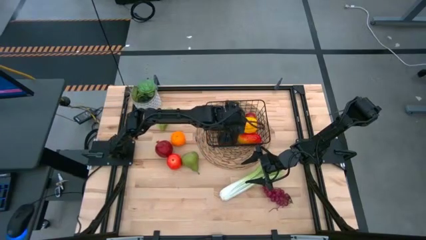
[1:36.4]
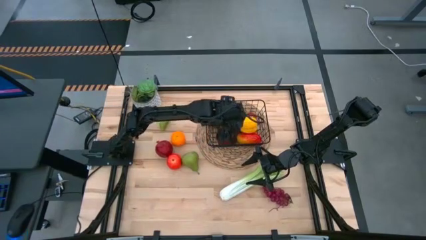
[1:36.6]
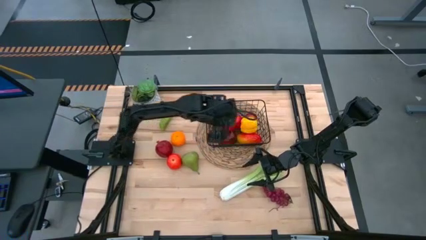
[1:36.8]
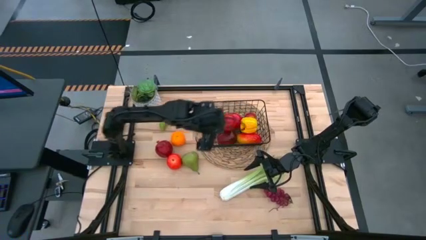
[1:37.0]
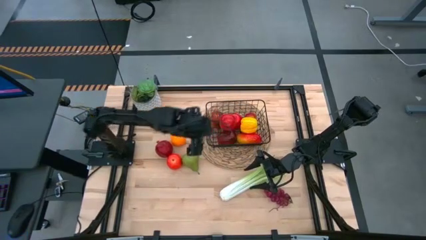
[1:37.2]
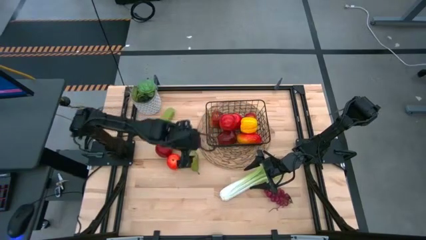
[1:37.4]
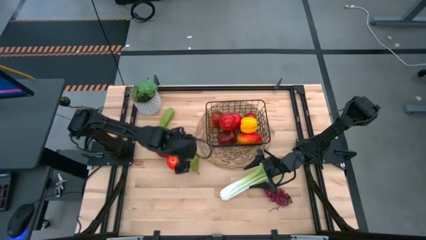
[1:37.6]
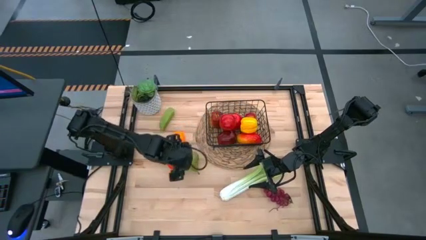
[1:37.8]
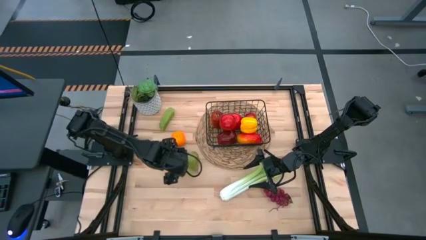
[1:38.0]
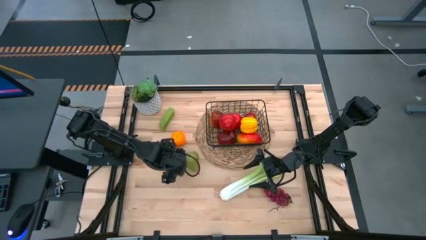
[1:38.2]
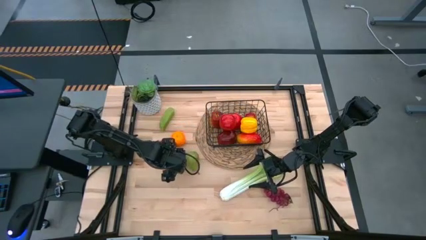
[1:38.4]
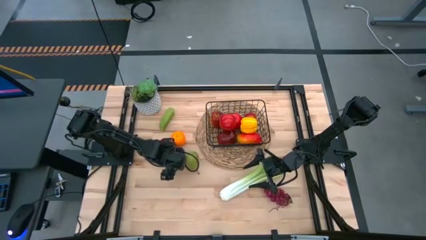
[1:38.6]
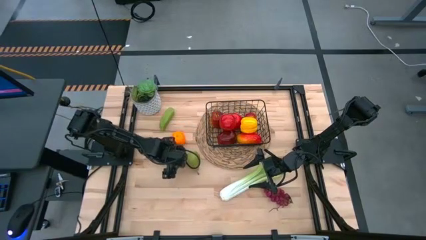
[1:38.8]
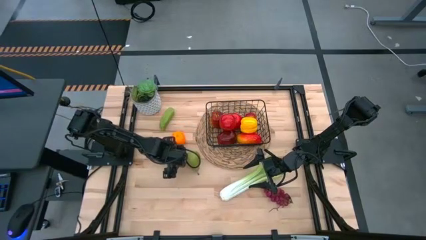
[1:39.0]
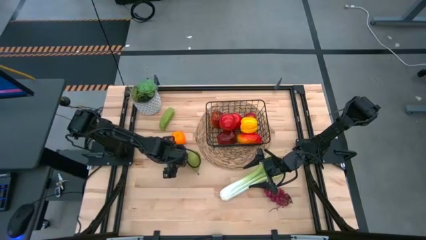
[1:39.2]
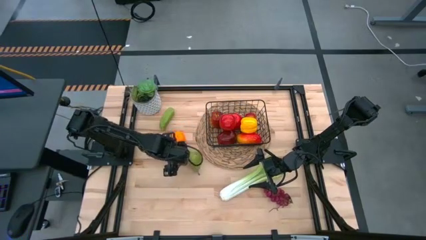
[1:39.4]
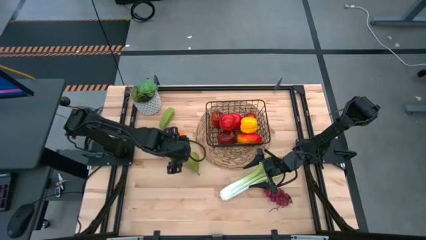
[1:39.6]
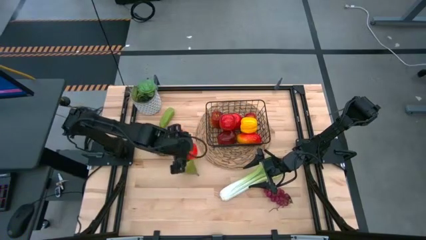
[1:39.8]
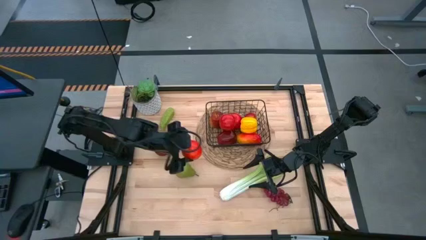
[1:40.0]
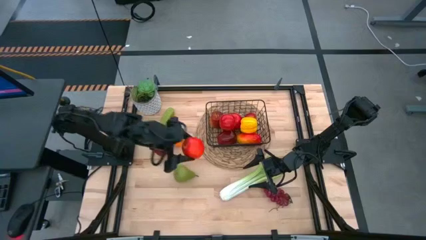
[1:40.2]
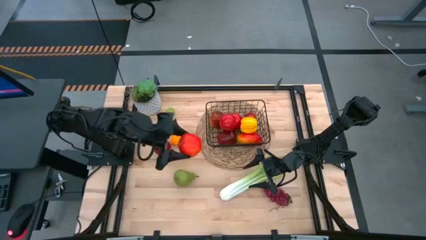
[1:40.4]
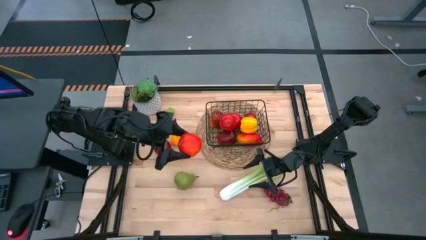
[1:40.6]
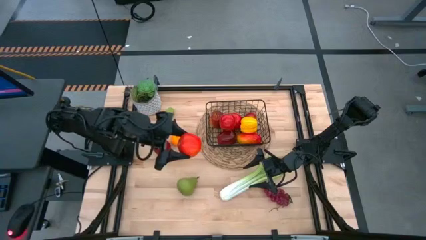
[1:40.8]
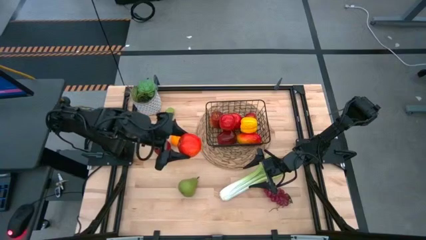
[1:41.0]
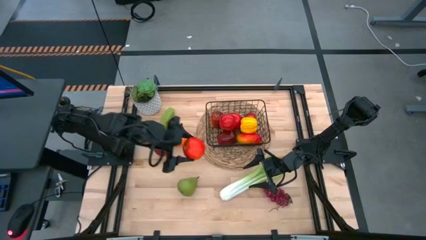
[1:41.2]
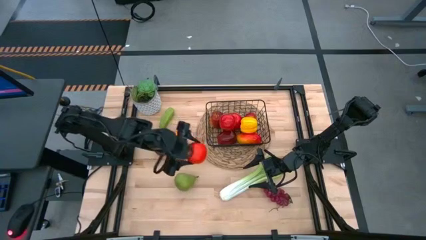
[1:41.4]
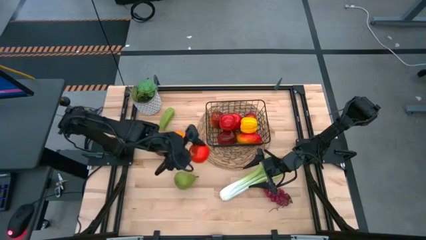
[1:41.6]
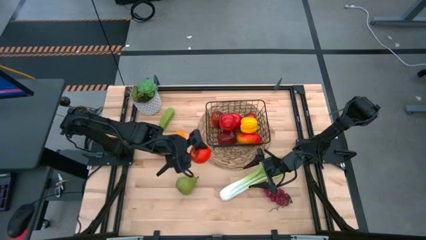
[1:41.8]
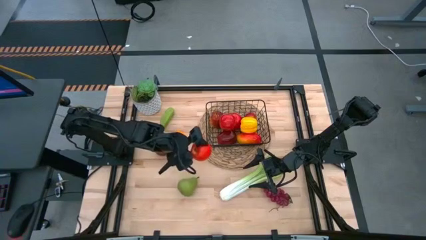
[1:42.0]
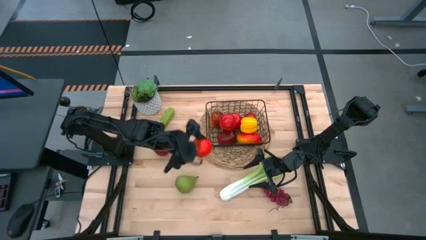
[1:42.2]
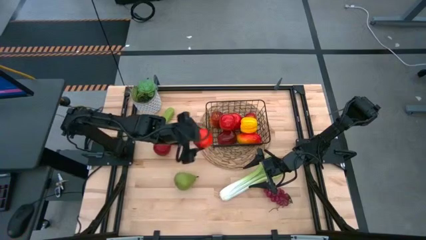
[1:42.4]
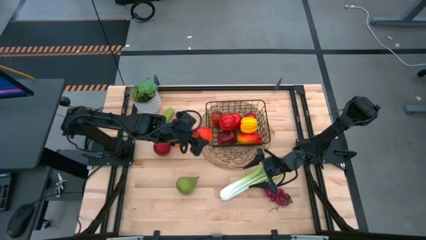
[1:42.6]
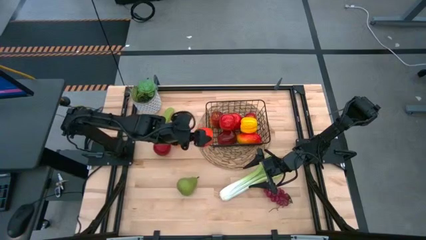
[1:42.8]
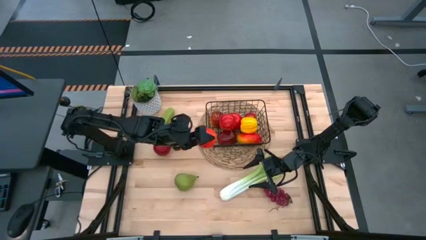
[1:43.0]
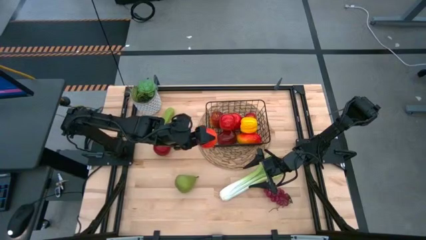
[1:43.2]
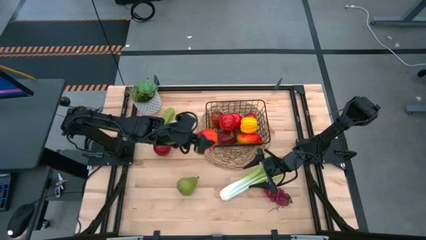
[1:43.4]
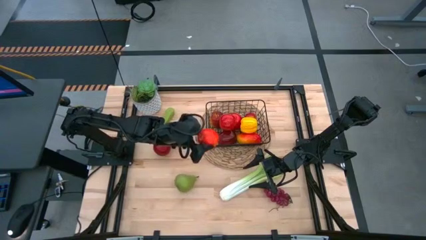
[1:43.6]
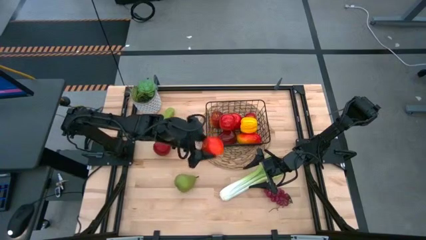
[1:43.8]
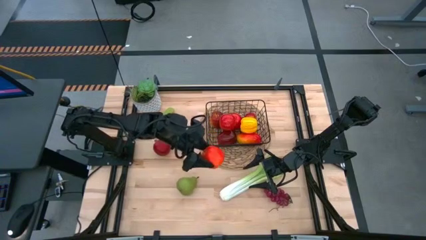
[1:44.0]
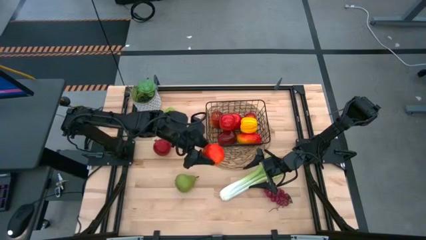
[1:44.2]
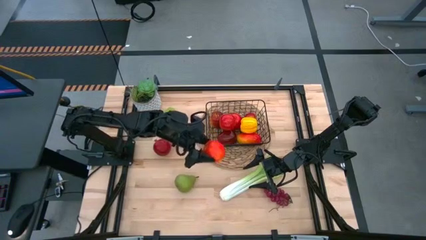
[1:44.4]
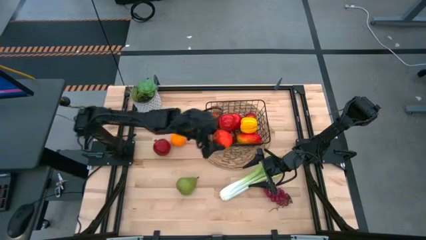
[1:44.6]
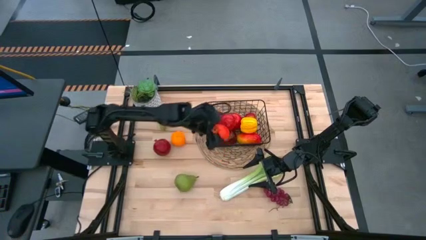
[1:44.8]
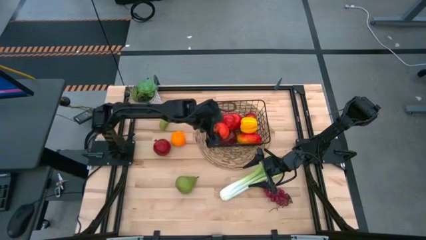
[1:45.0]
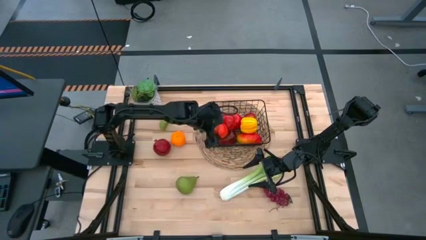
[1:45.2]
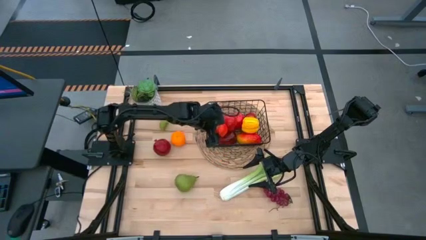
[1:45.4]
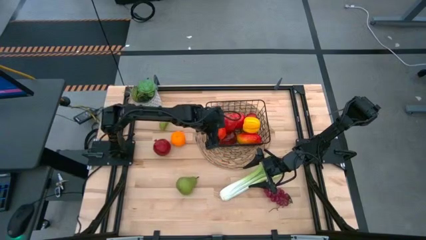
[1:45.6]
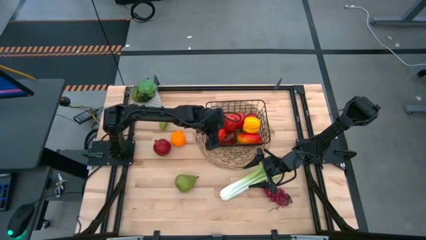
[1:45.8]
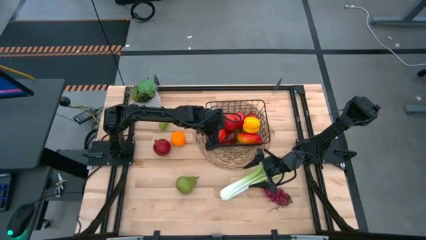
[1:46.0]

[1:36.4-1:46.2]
Task: Build produce basket
Put the red apple into the black wire basket

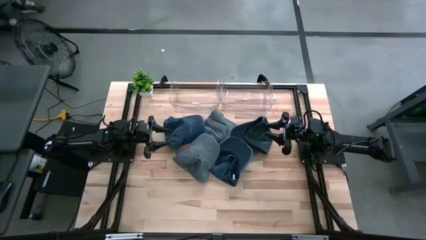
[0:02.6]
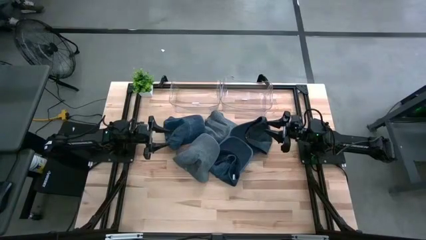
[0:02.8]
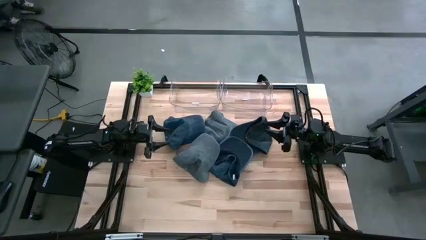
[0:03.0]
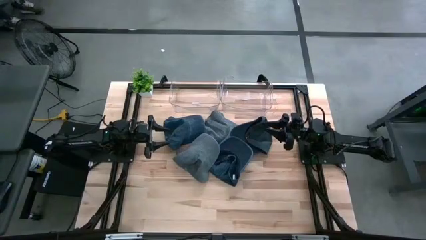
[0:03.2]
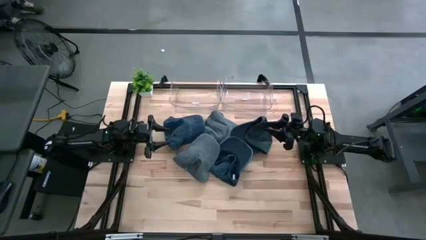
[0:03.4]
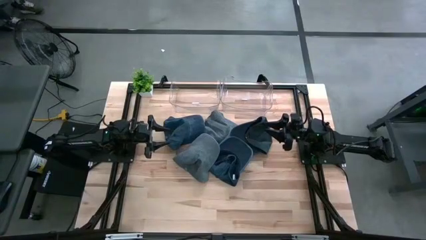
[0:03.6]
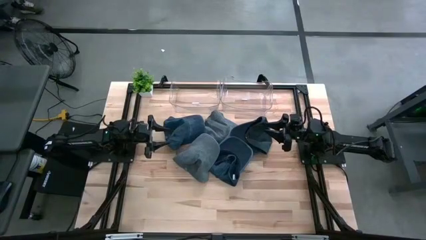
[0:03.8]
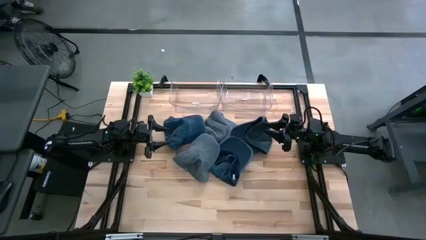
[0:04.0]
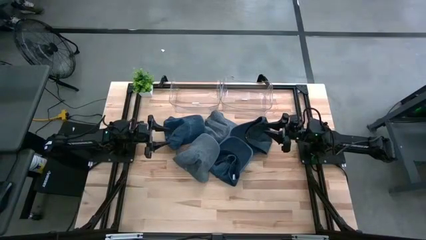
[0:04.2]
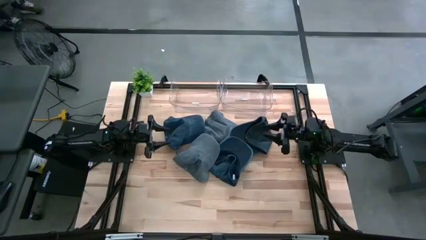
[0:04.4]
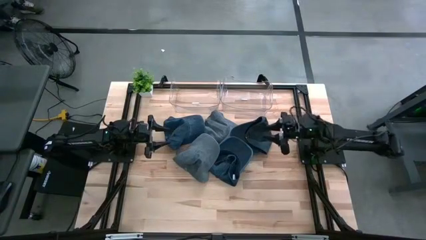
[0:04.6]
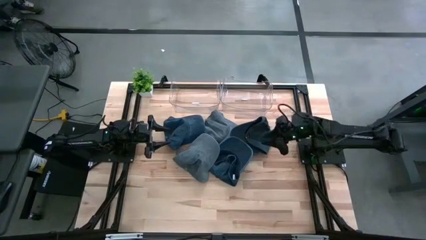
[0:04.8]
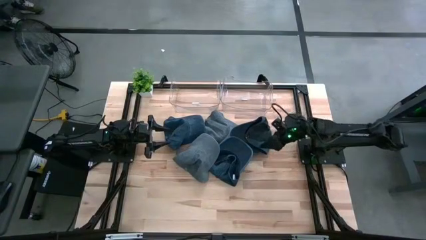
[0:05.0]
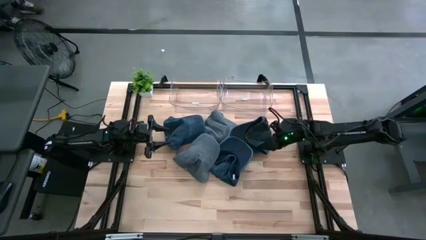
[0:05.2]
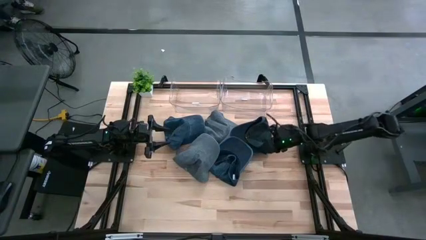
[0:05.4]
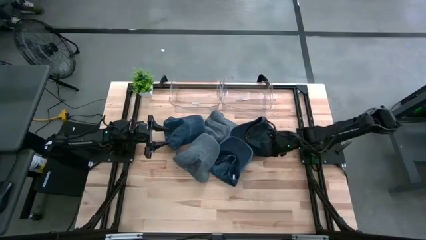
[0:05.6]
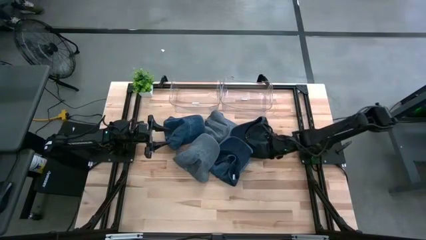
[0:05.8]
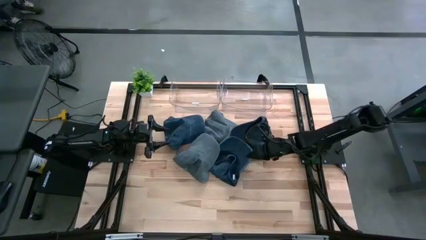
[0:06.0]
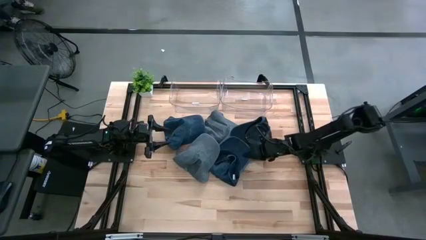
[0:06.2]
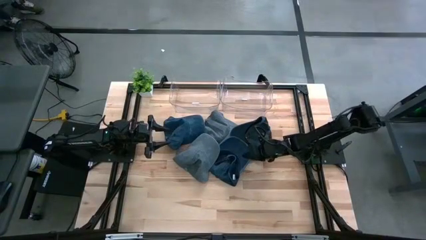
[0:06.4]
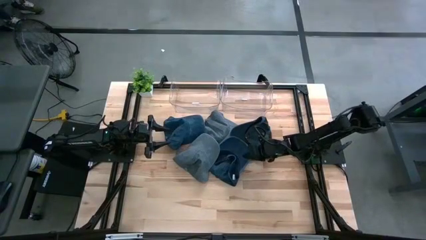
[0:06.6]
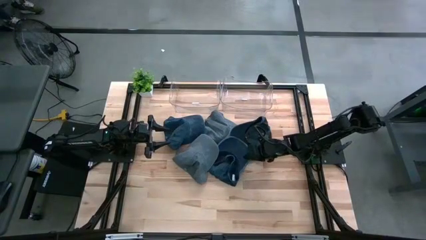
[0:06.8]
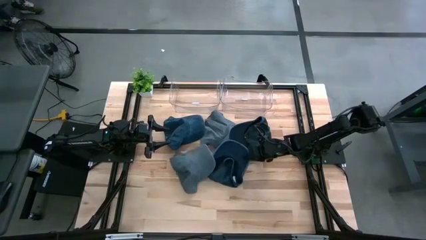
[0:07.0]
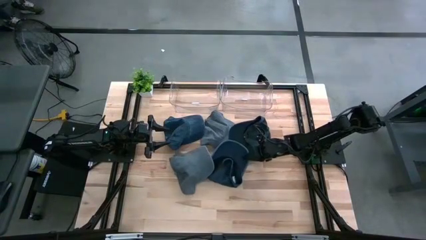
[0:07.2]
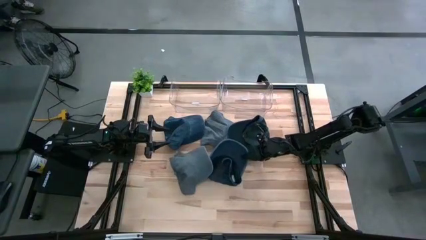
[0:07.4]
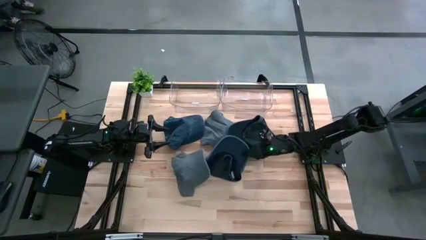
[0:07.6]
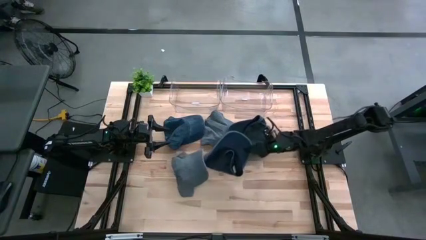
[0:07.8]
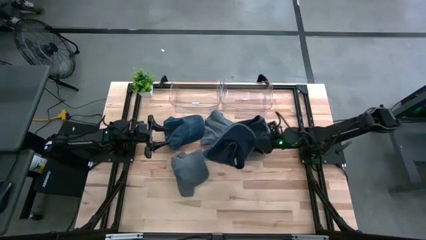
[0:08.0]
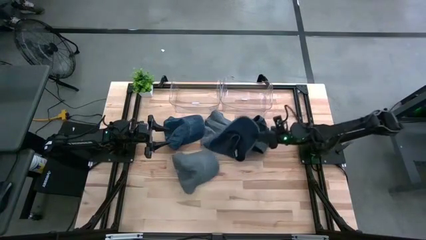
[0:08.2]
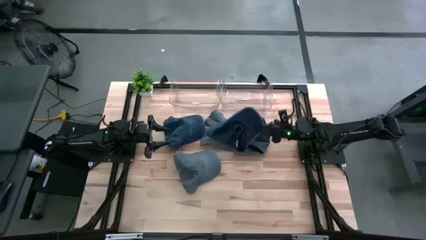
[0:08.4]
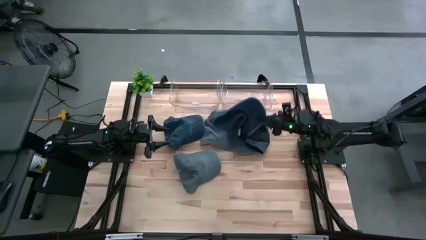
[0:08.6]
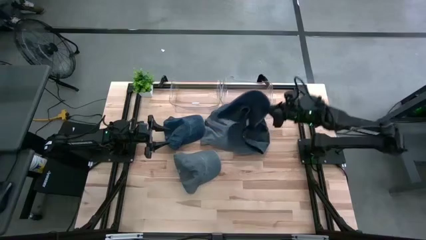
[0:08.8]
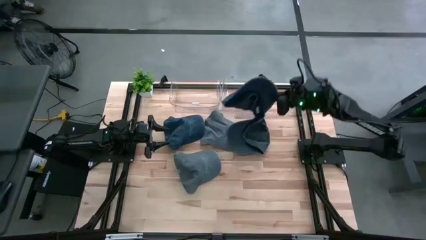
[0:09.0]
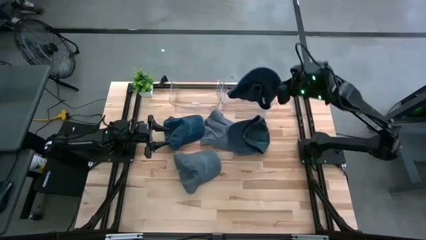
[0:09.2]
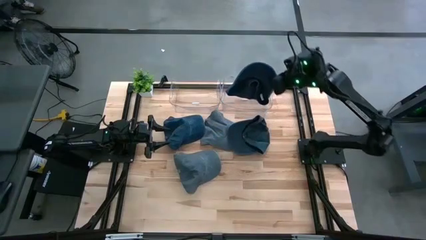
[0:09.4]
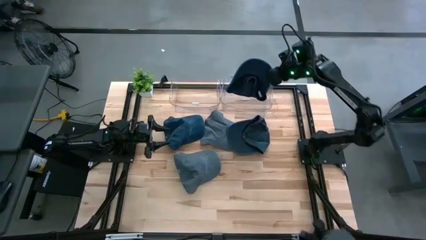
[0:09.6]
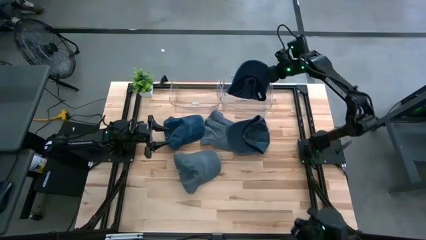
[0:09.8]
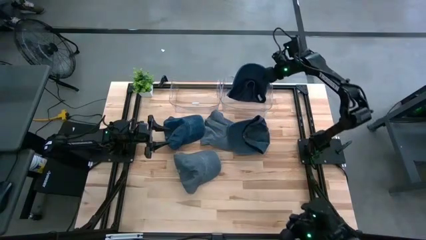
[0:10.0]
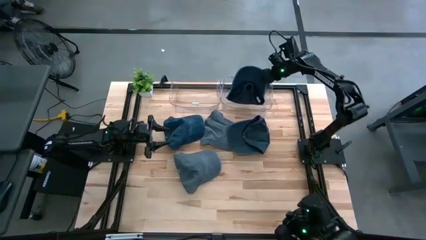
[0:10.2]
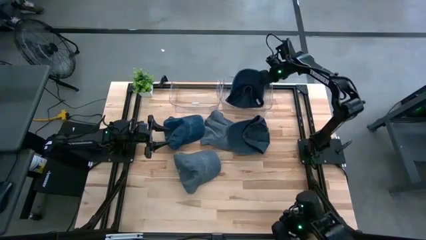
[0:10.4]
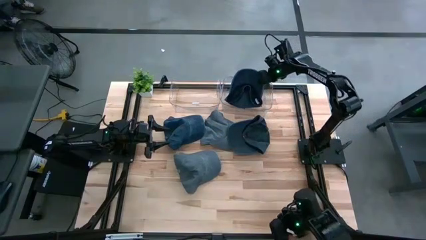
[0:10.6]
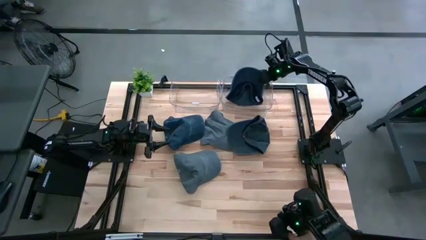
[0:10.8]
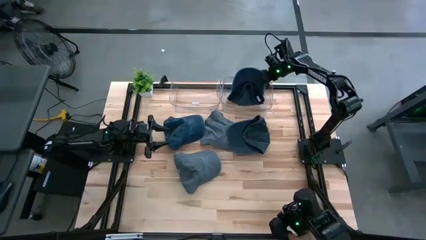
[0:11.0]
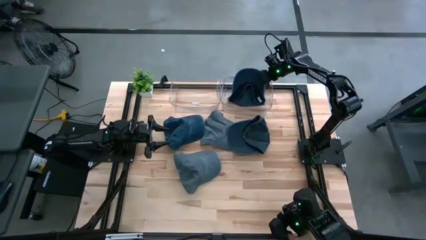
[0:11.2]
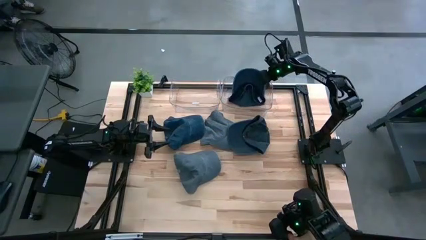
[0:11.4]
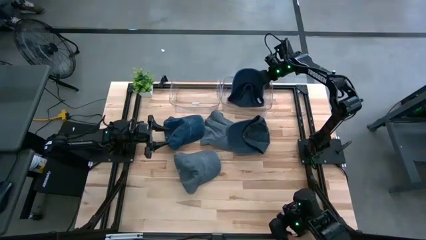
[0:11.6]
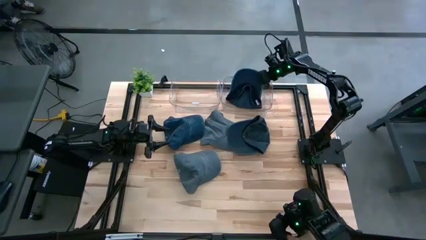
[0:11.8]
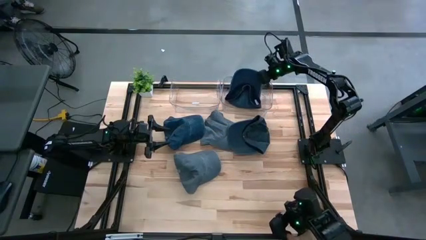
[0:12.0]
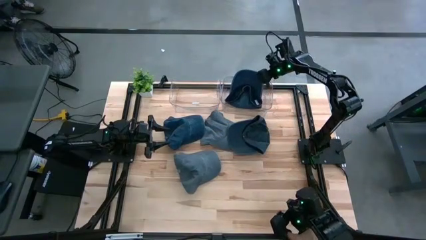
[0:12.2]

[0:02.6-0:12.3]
Task: Pick & Place hat
Put the bottom blue cap into the right transparent bin
